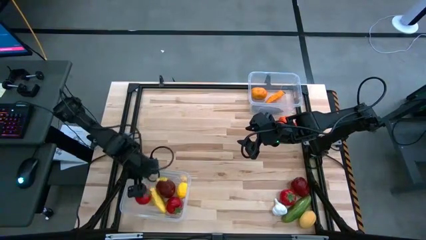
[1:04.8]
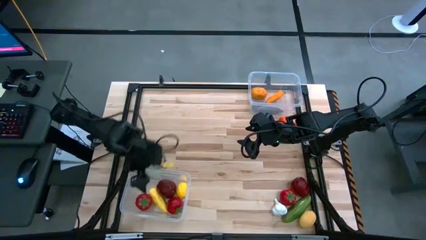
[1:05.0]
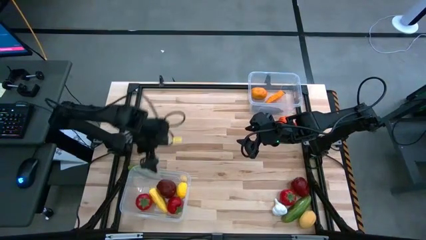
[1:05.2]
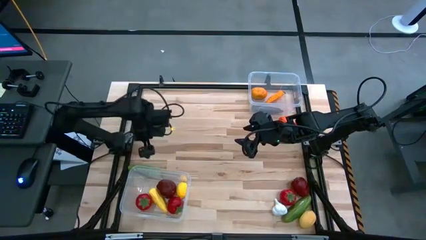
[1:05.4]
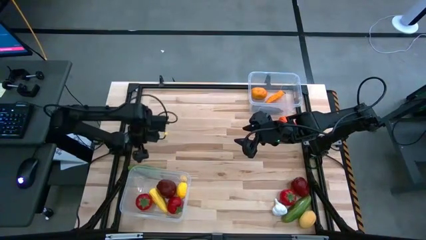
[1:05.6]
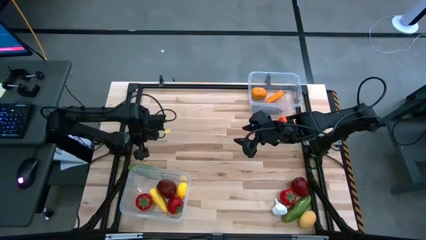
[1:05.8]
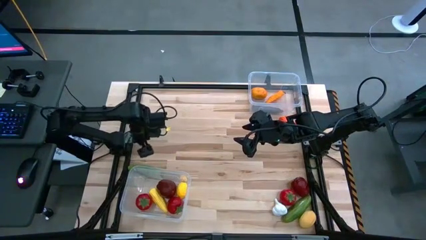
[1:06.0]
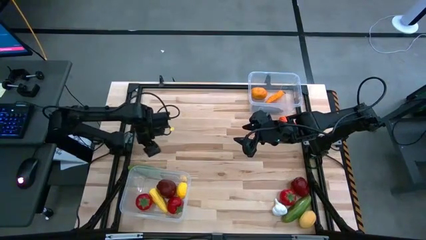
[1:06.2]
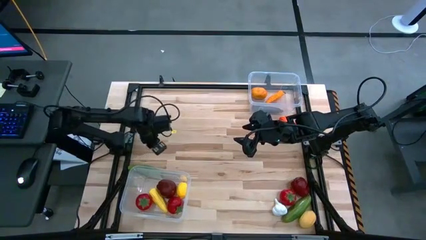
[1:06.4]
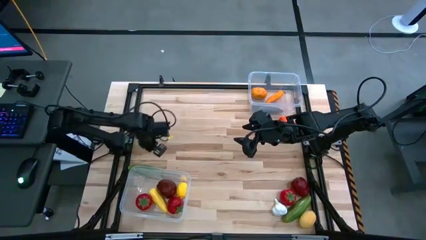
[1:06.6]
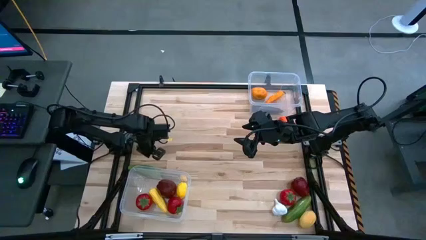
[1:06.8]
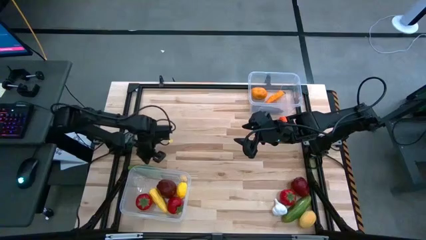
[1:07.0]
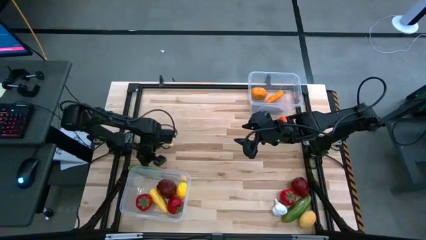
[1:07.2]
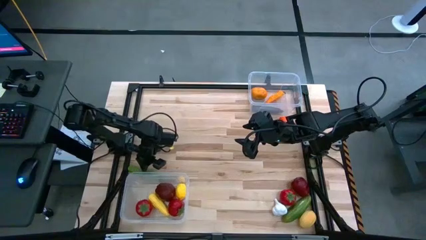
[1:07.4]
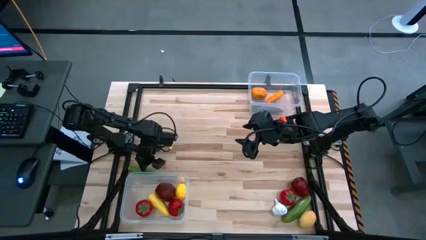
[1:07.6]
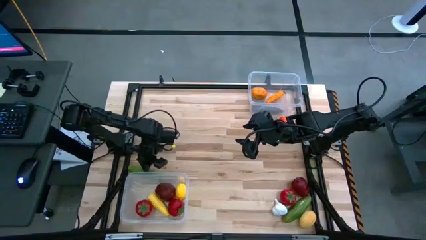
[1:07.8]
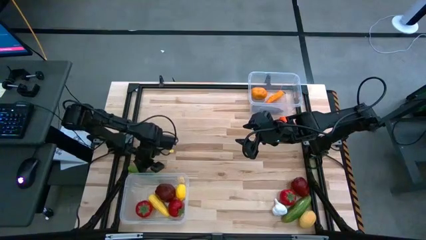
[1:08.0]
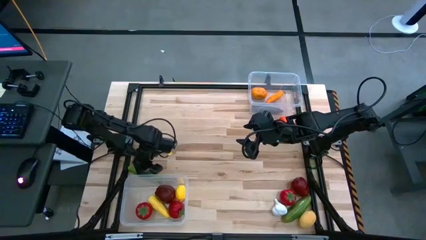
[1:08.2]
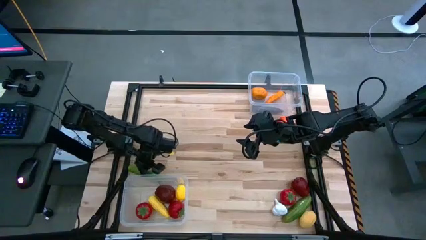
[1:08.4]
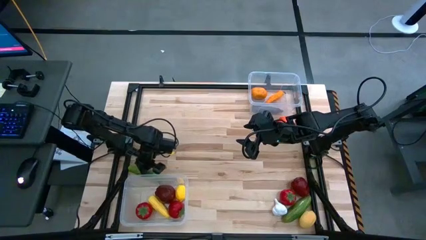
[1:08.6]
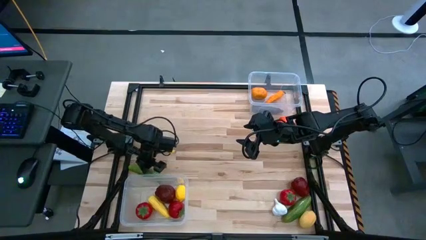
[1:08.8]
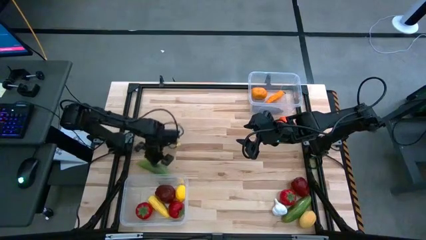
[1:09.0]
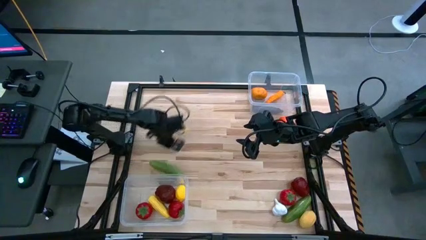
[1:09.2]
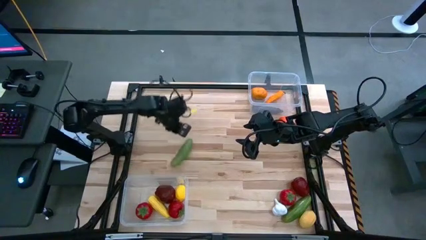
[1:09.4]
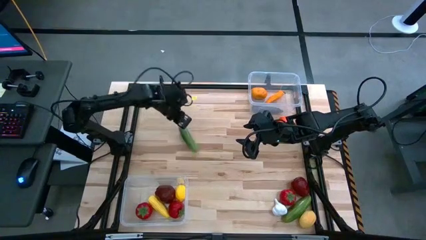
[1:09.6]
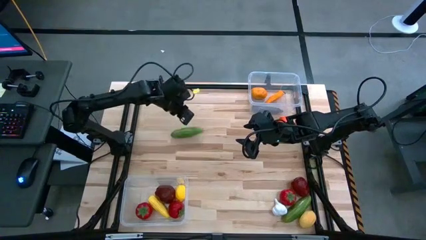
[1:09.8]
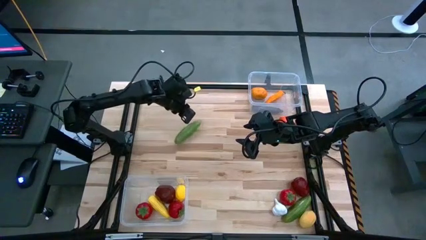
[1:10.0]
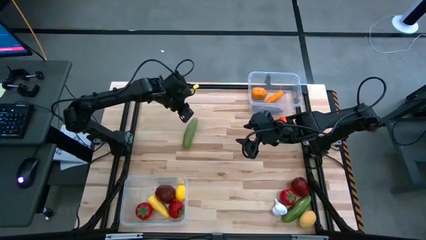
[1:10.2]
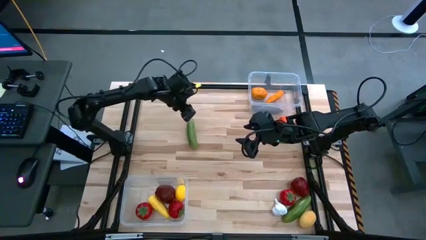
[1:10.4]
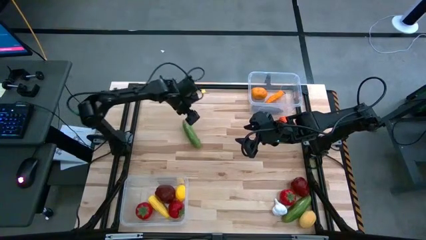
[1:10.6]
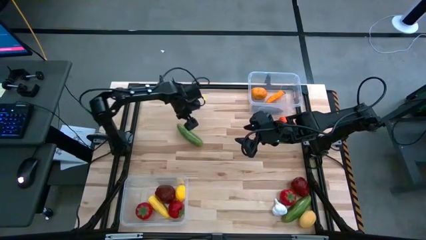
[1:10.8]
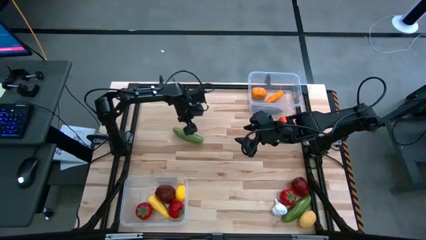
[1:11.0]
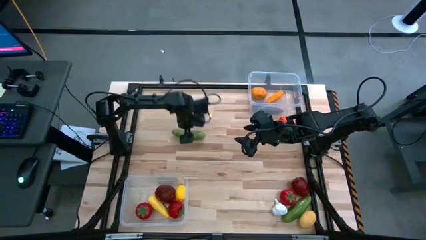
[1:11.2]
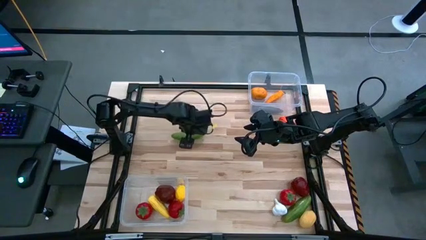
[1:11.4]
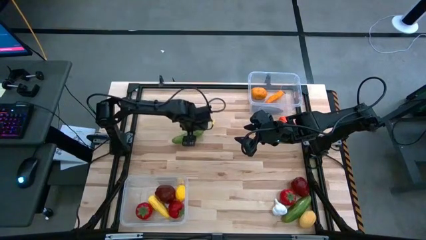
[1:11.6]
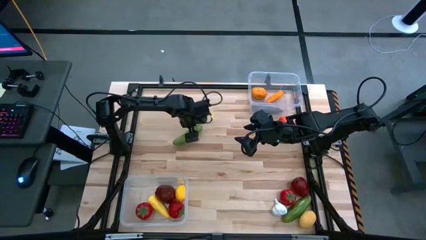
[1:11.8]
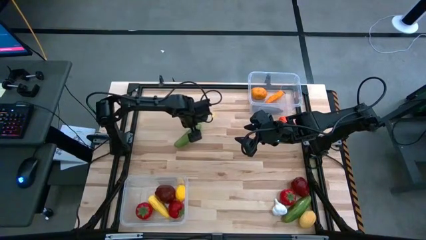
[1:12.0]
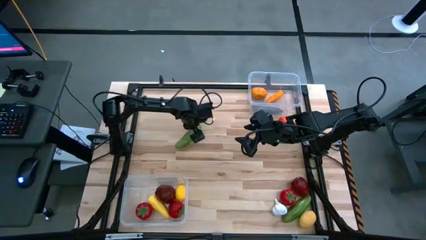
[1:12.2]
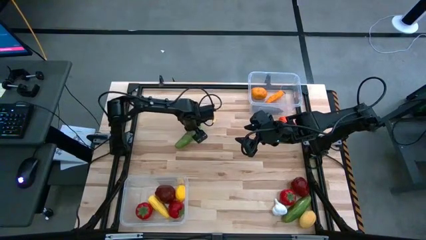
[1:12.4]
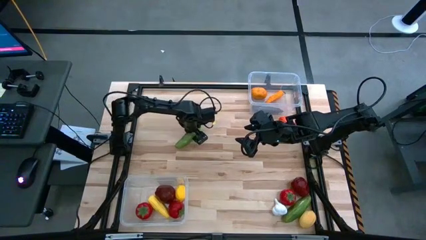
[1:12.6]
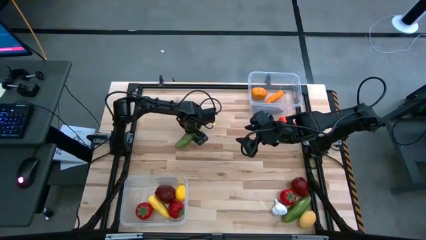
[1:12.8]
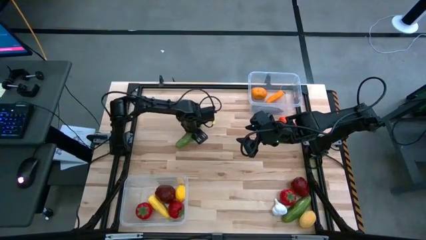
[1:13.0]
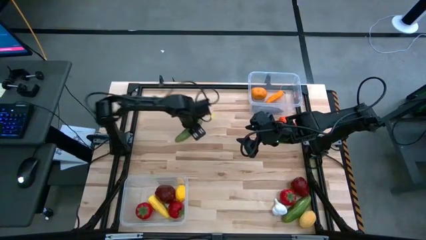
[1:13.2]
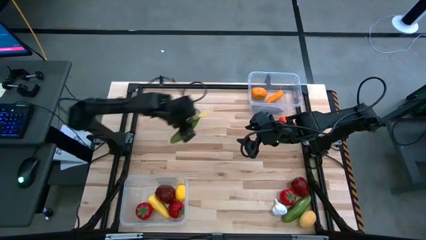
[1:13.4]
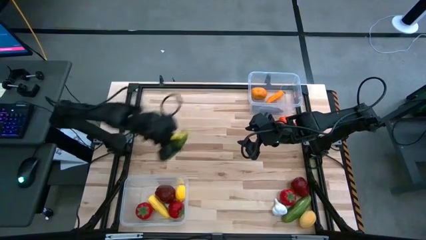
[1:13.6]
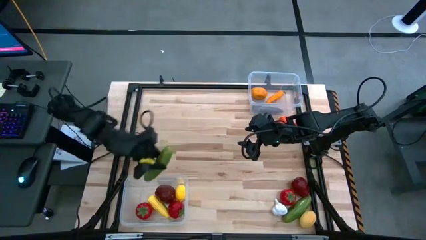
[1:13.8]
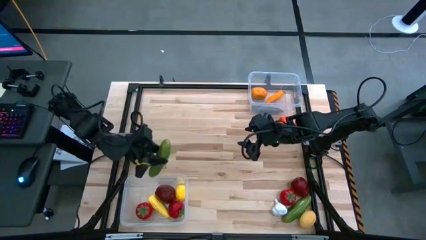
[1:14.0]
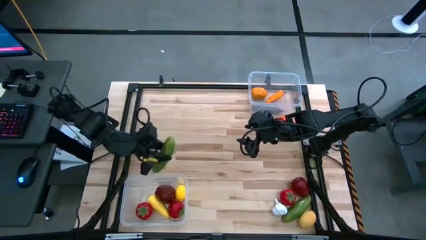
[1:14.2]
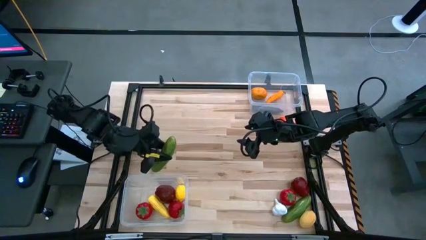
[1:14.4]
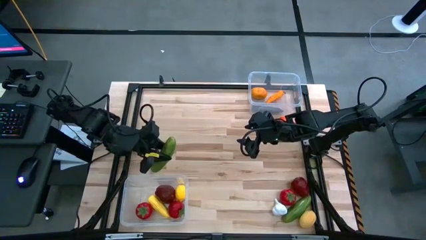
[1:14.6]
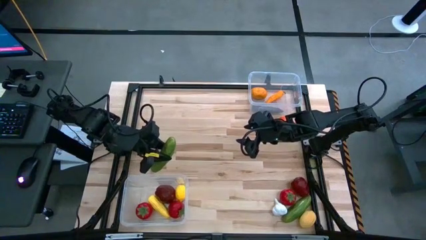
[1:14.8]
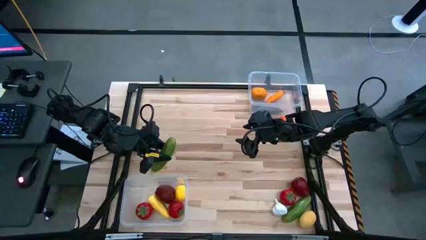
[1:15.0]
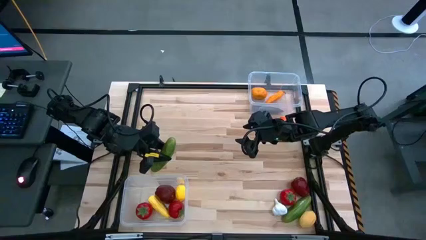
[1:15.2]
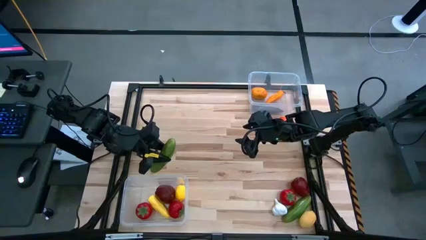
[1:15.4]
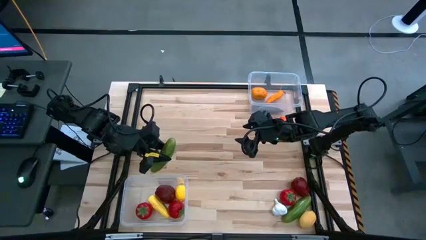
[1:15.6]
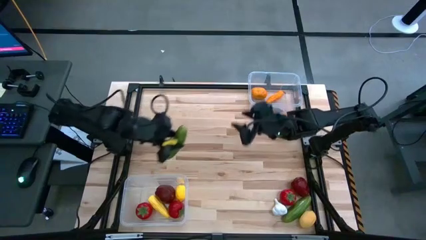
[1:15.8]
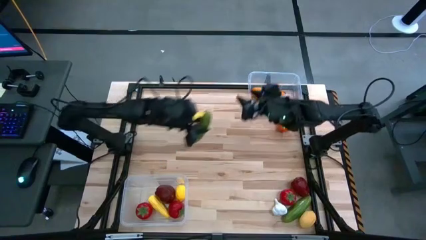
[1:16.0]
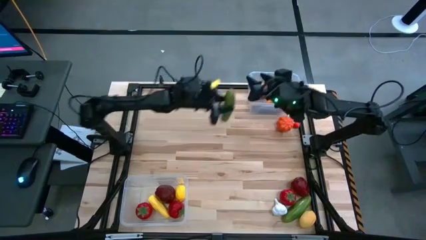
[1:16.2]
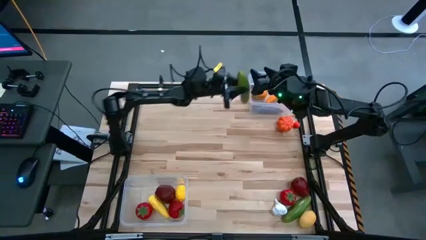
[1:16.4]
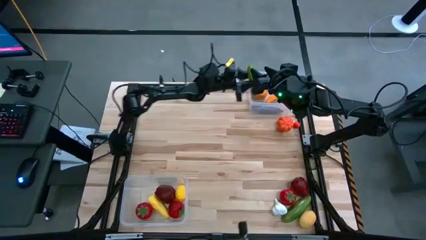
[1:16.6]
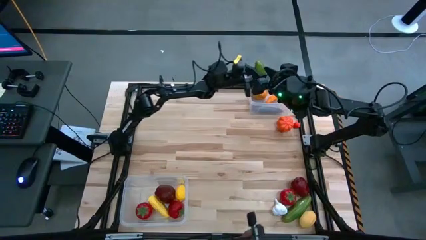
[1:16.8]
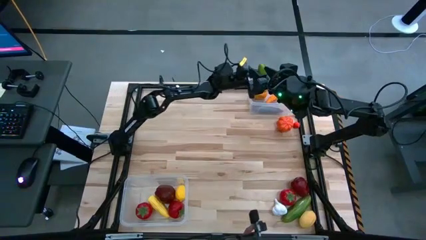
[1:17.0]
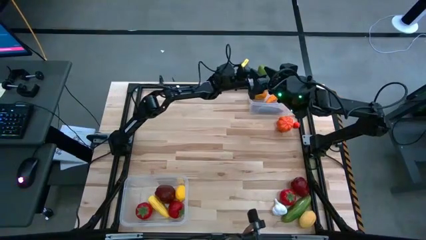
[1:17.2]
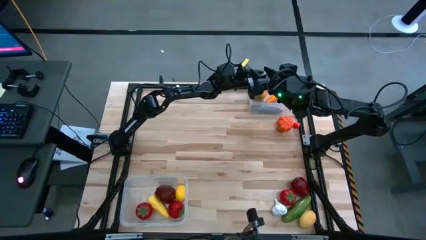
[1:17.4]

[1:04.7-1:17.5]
Task: Sort produce into baskets
Put the left green cucumber into the top transparent bin

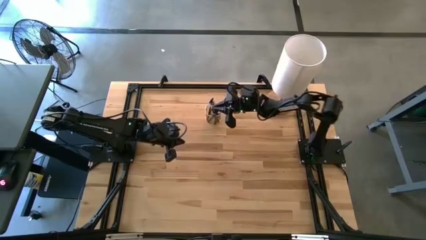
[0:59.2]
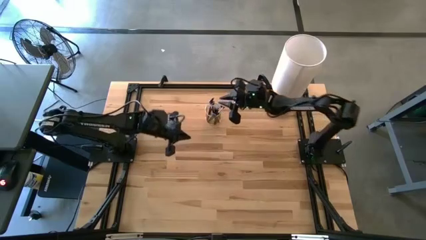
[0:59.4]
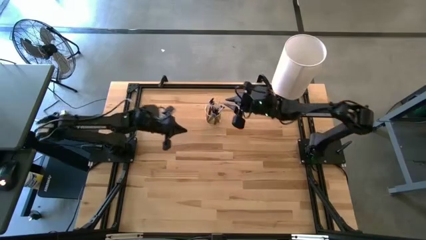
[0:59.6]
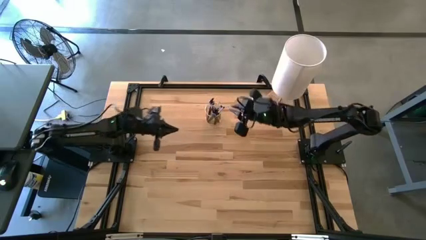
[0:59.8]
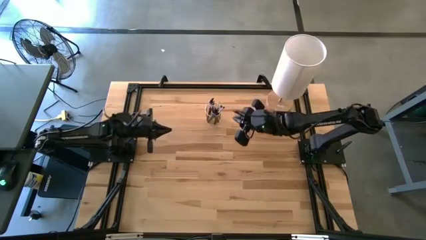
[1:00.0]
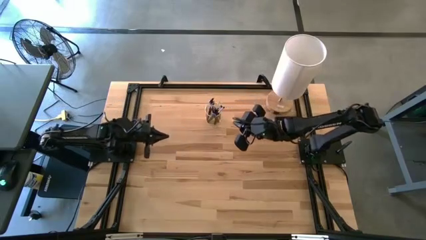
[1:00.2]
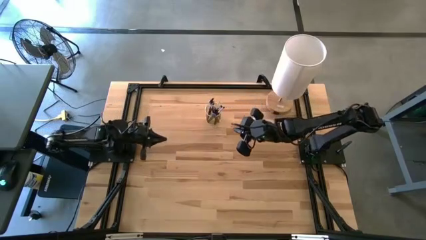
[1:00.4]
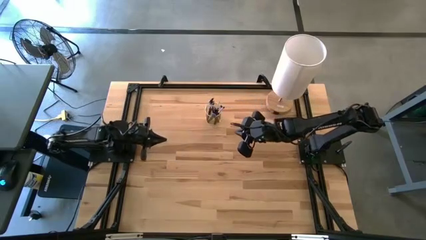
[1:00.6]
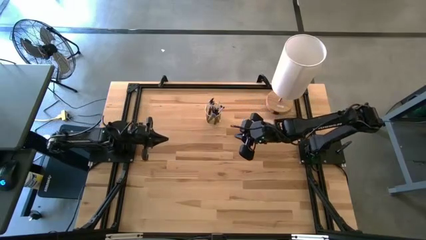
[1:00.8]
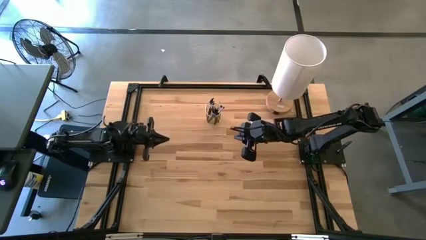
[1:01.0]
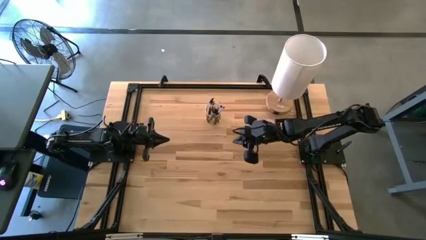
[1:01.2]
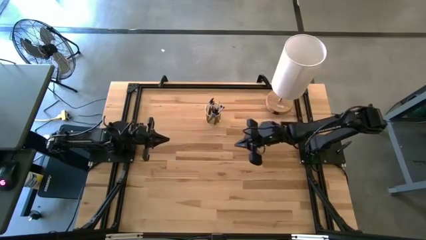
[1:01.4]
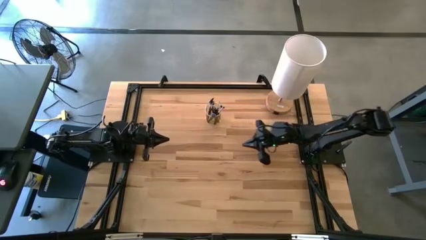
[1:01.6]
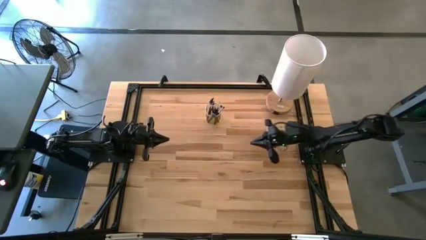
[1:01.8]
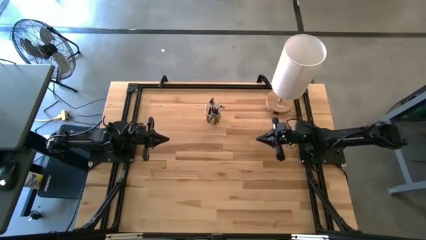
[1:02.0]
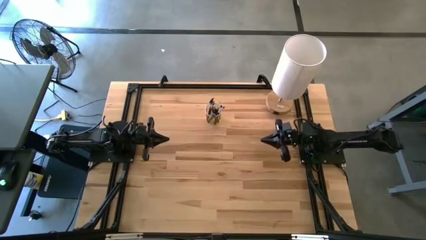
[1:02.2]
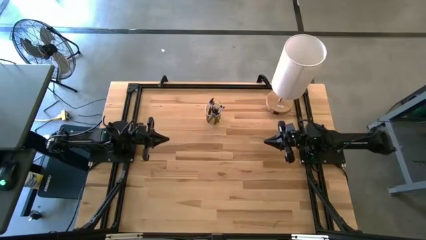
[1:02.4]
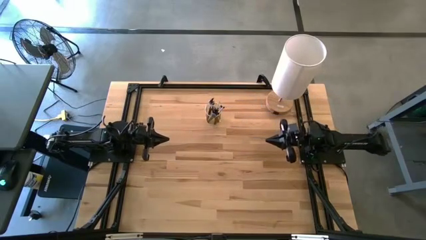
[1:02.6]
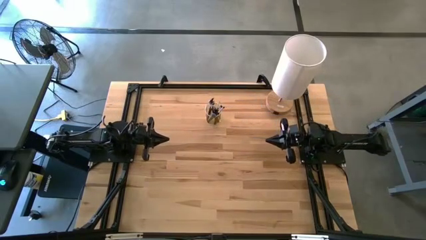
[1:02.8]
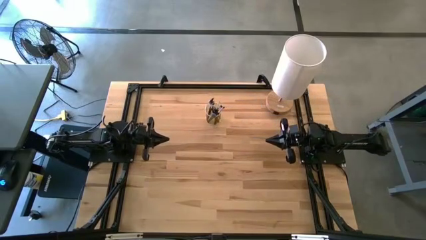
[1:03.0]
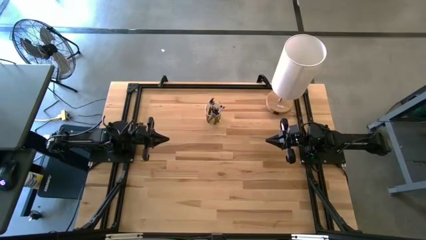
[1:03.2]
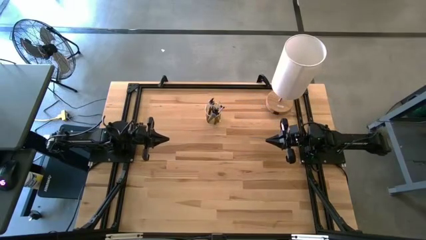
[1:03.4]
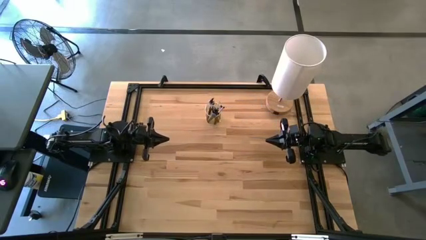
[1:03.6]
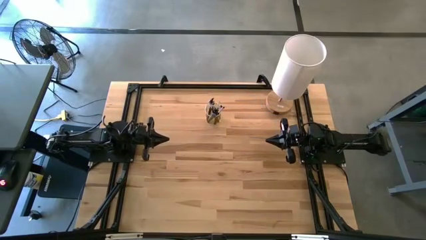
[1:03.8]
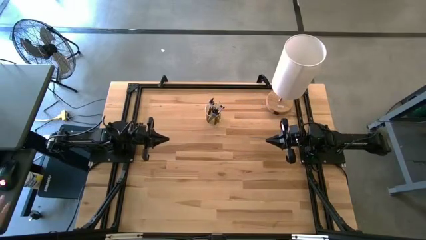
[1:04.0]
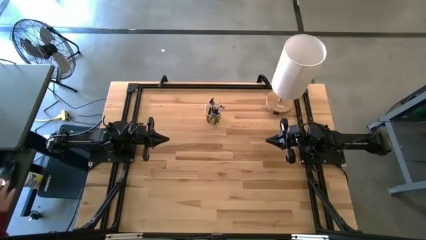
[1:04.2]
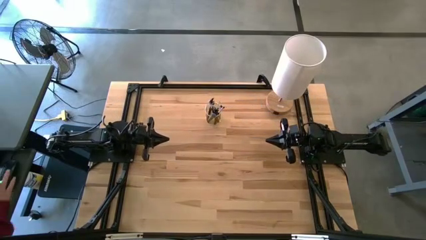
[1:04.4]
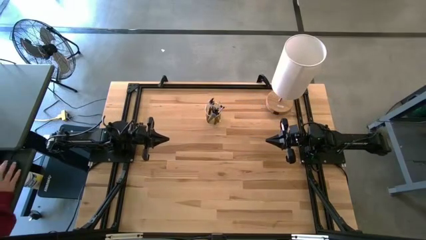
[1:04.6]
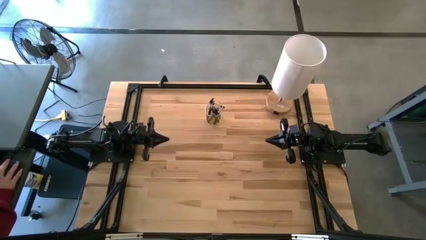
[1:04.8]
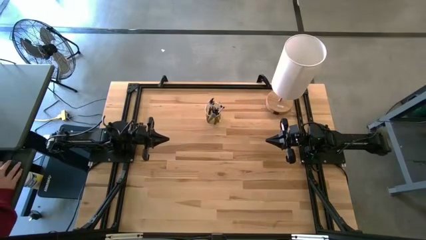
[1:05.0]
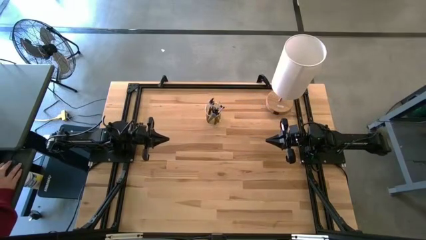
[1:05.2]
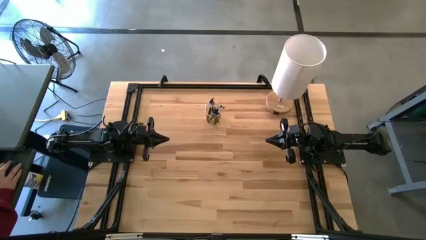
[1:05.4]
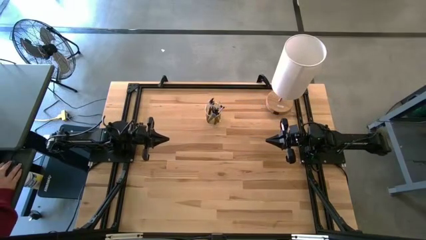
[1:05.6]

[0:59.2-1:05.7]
Task: Put items in baskets/containers
Return to Home Position
